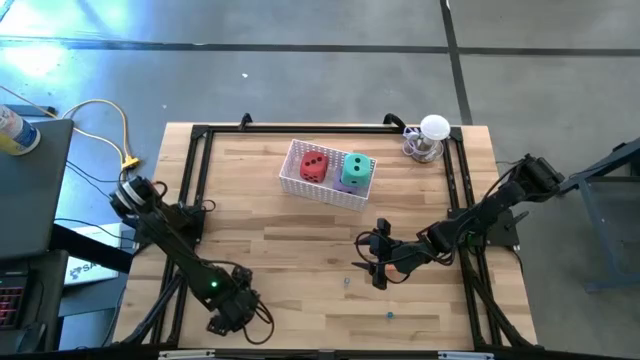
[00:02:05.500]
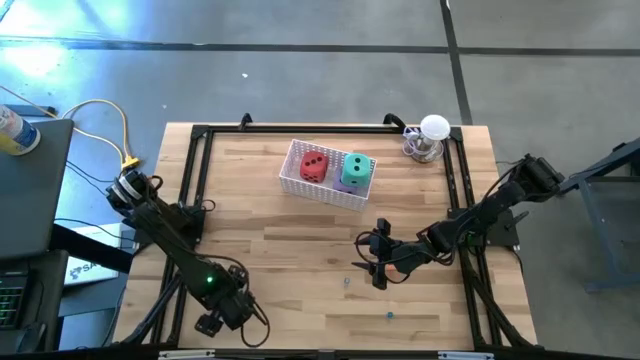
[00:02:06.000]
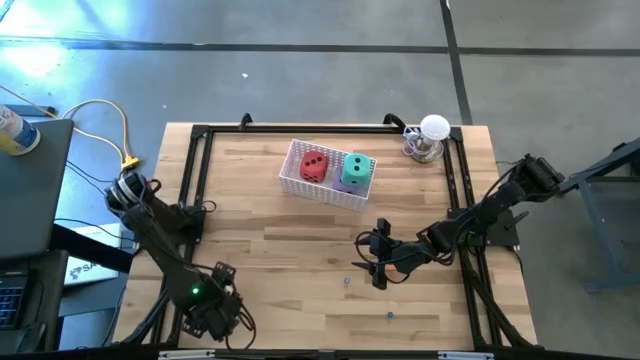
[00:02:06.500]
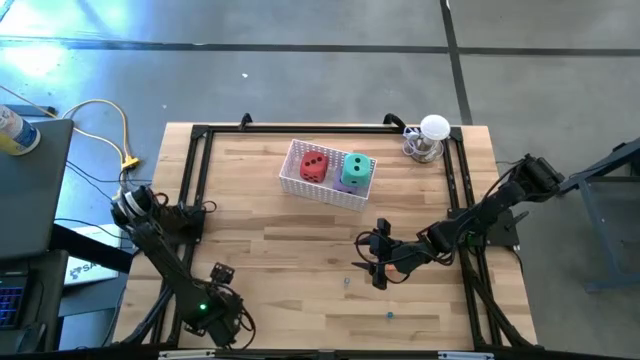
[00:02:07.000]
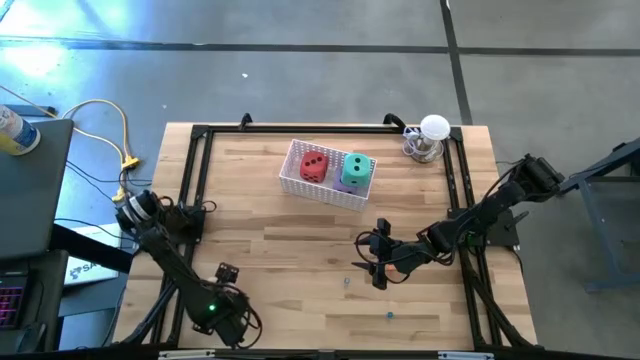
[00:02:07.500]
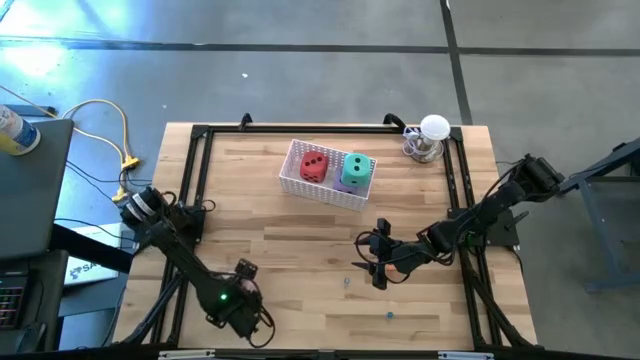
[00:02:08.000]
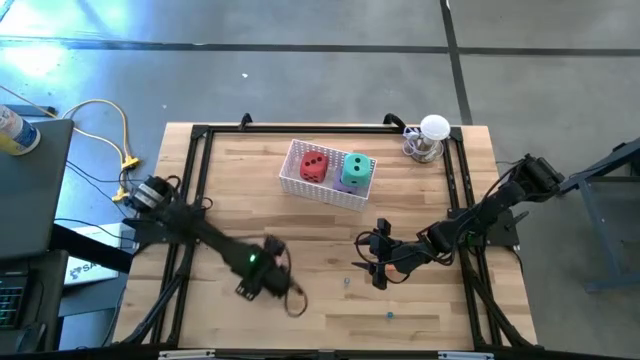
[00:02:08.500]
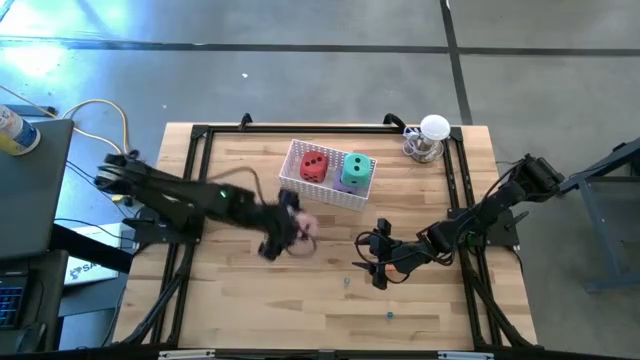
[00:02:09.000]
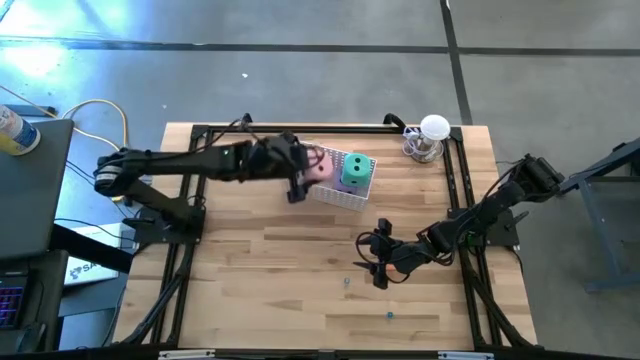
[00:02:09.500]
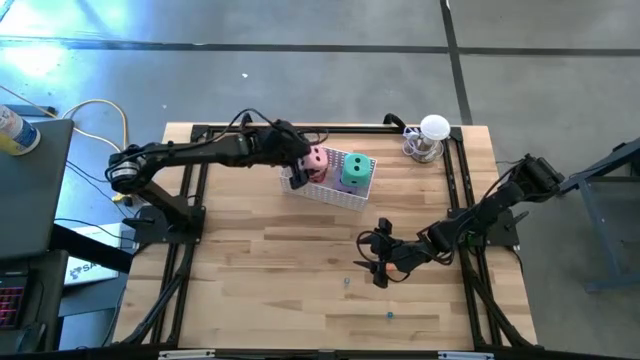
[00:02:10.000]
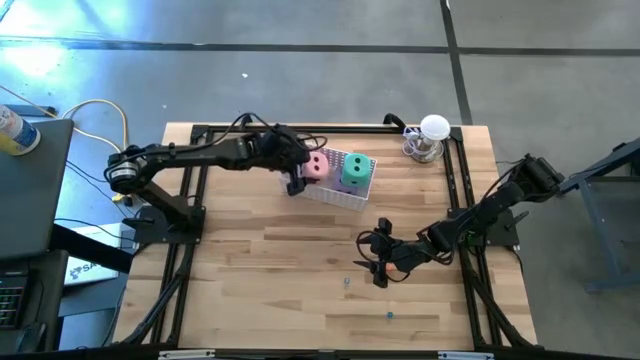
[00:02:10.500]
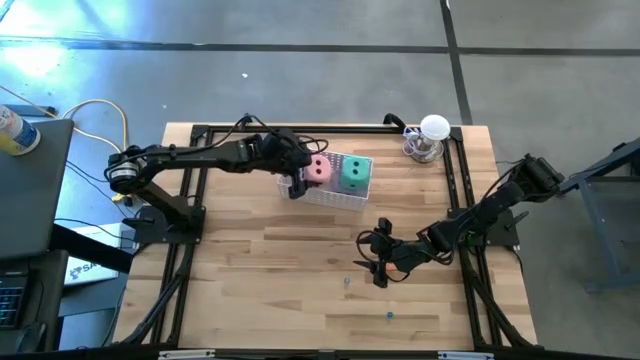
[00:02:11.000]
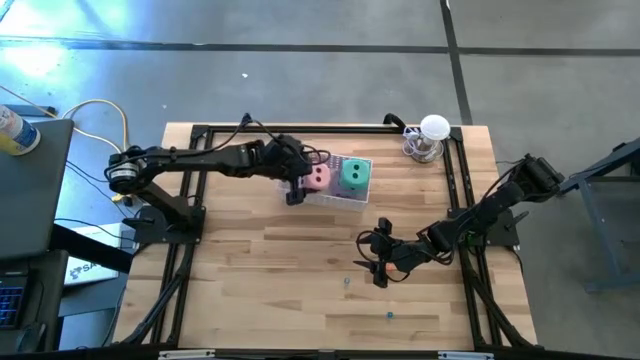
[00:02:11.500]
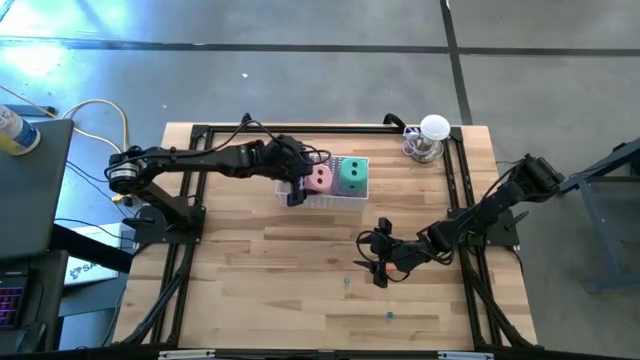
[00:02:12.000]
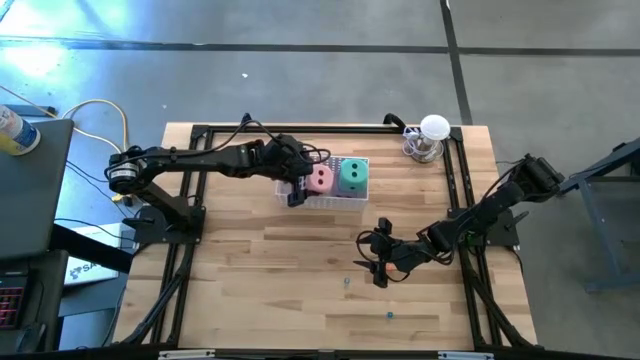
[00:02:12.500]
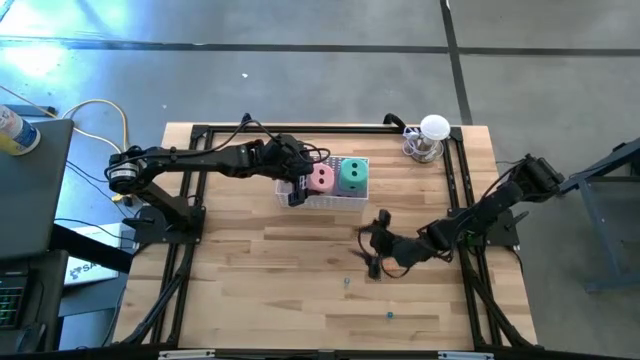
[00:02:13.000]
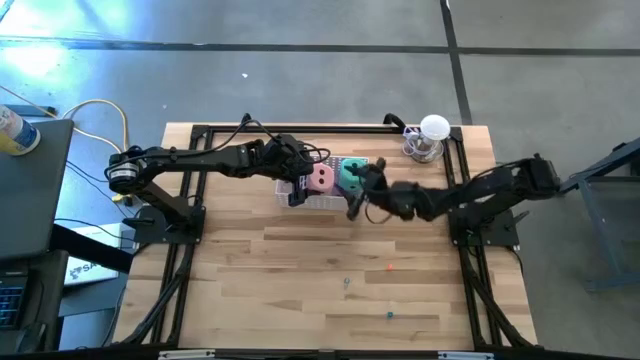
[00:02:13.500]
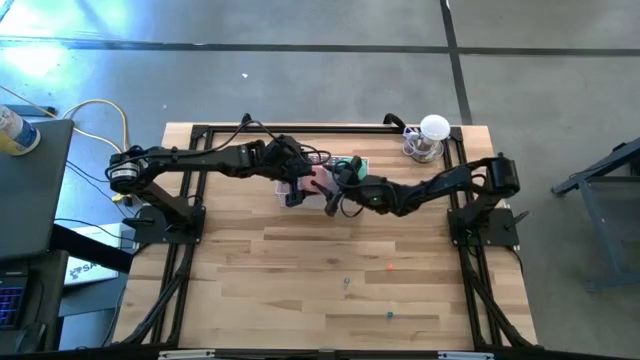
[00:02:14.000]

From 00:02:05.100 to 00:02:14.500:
Task: Pick & Place Dice
Put the big pink die into the white bin

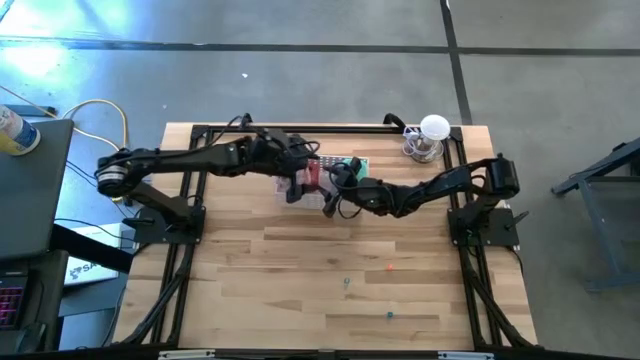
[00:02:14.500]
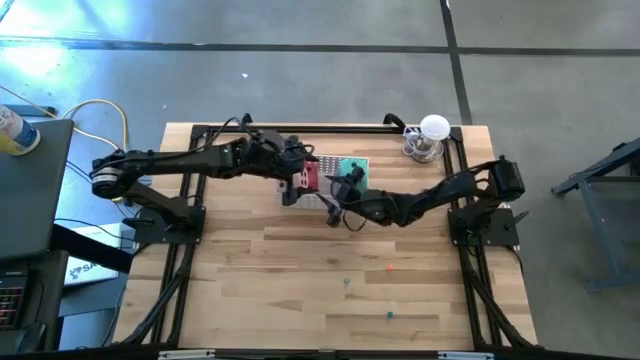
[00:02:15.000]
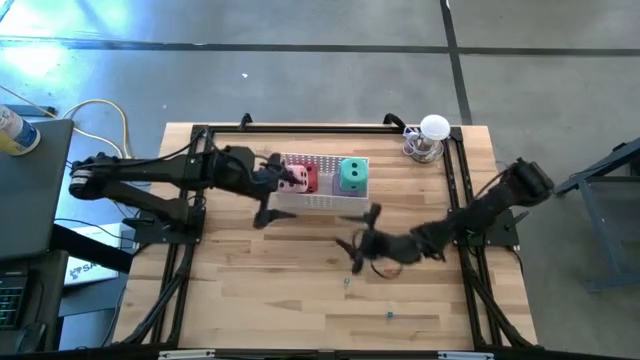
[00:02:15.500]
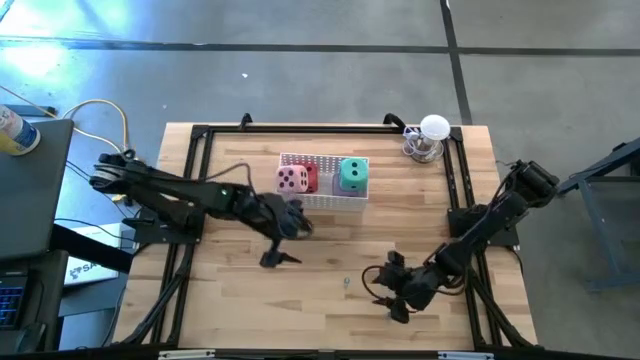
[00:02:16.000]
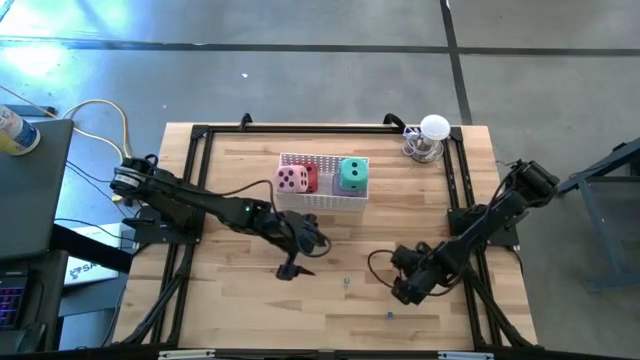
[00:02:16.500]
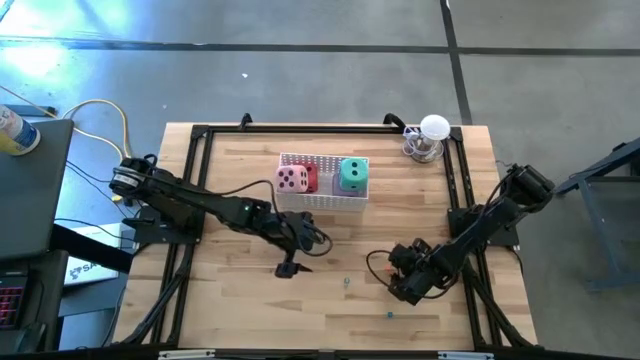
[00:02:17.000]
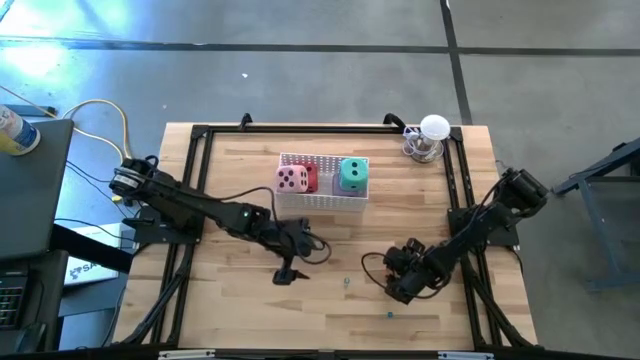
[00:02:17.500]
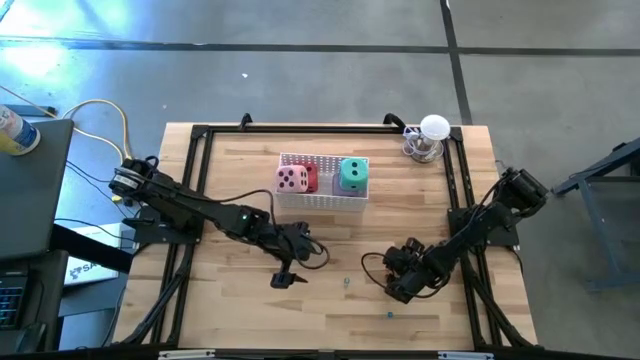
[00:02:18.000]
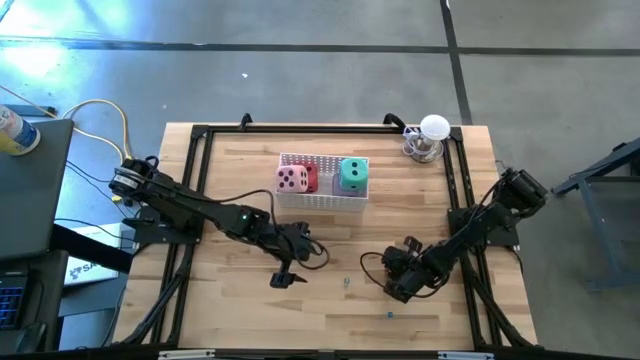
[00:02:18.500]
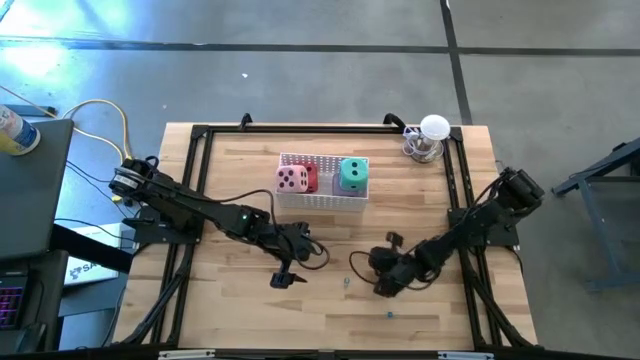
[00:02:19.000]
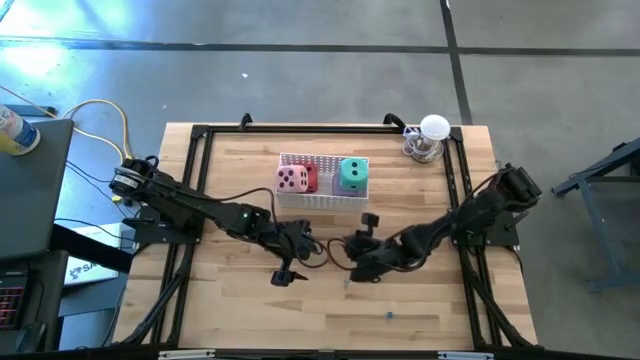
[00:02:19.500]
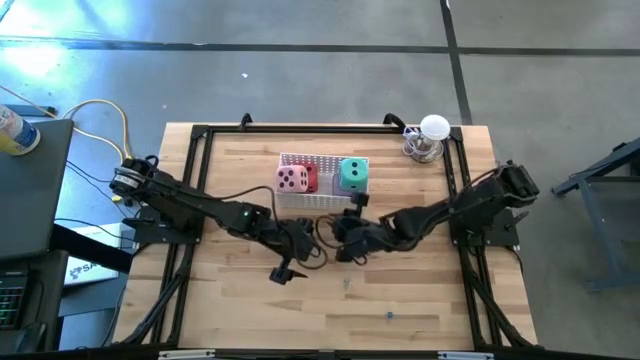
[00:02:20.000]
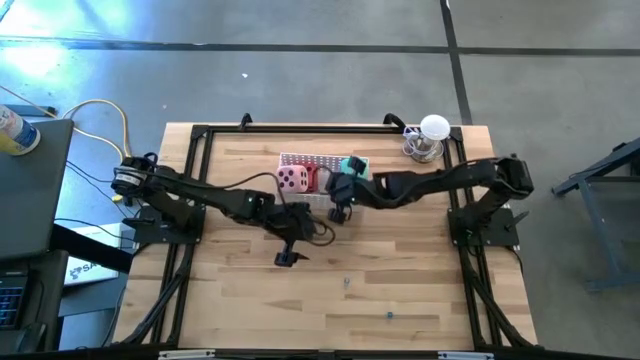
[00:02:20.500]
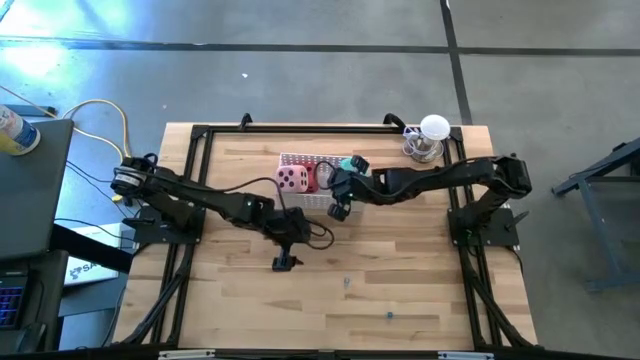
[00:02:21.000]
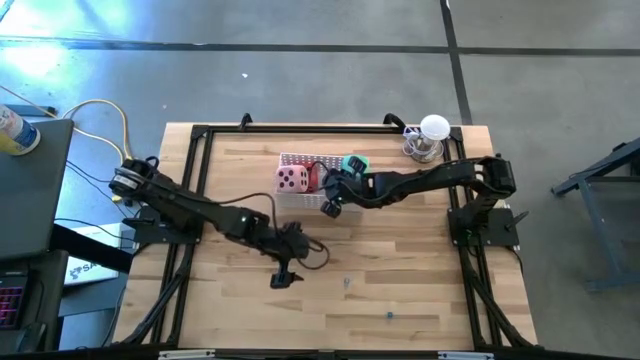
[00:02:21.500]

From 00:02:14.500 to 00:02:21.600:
Put the small orange die into the white bin

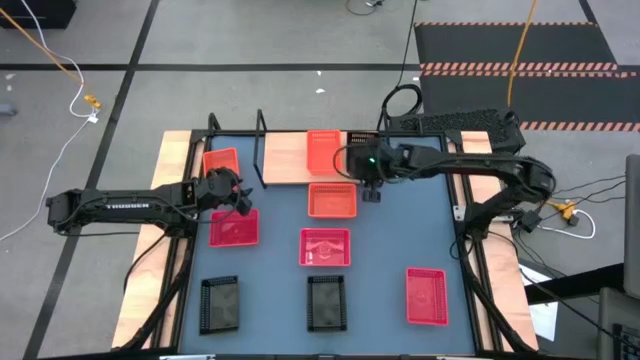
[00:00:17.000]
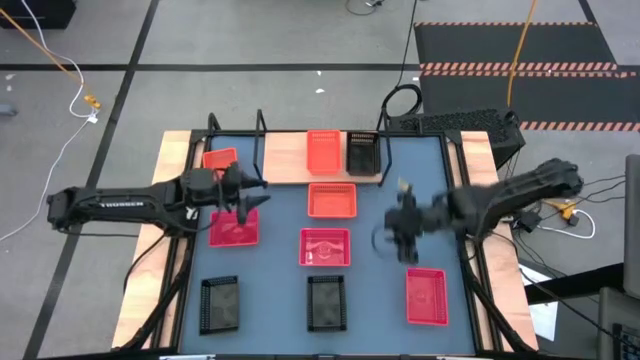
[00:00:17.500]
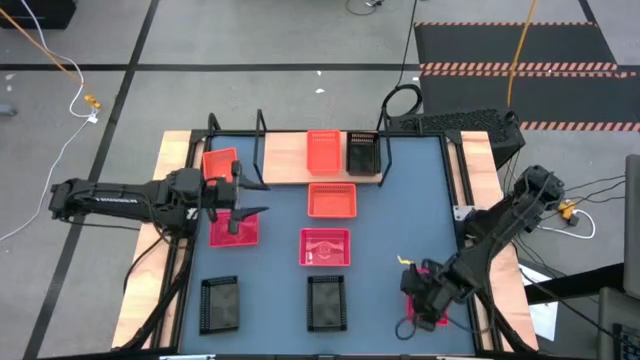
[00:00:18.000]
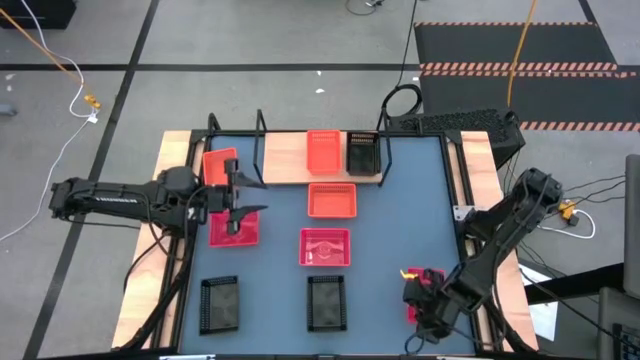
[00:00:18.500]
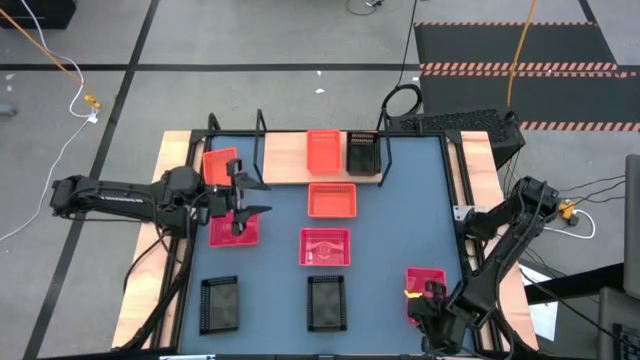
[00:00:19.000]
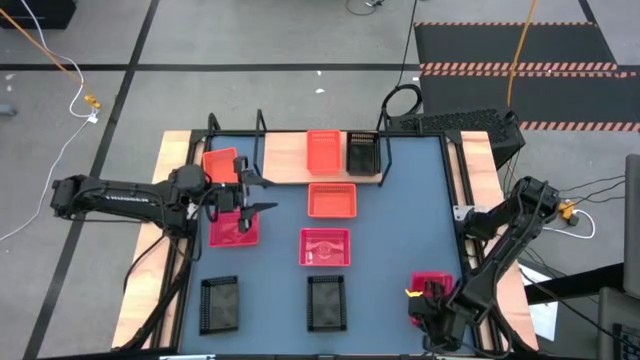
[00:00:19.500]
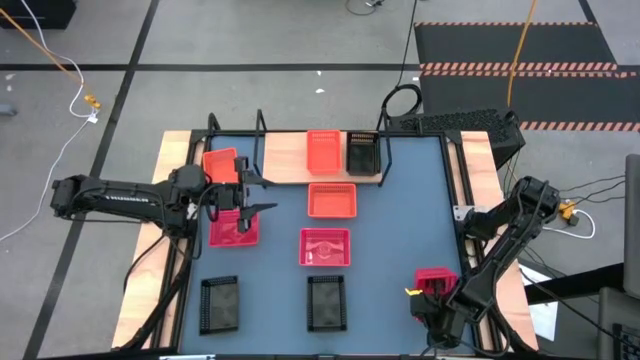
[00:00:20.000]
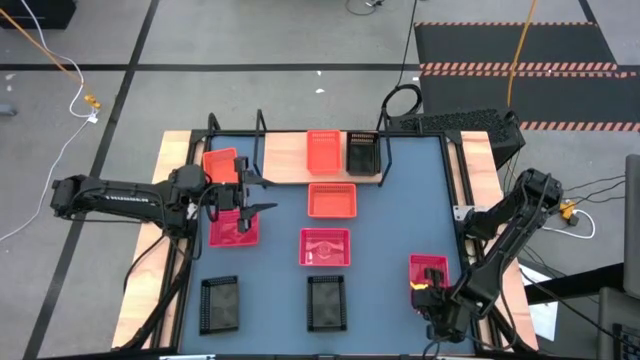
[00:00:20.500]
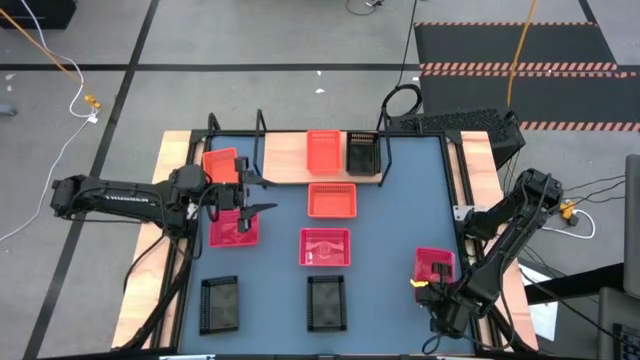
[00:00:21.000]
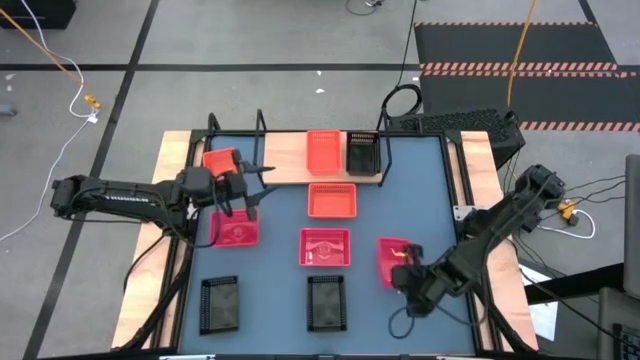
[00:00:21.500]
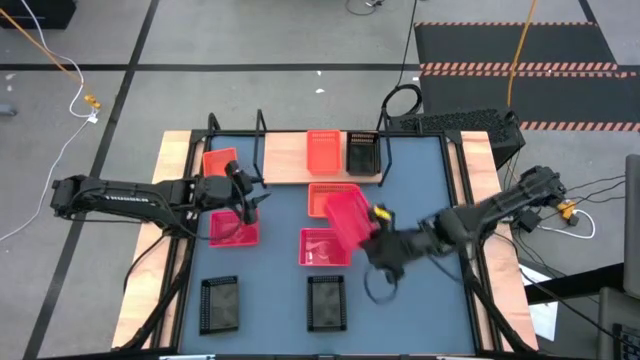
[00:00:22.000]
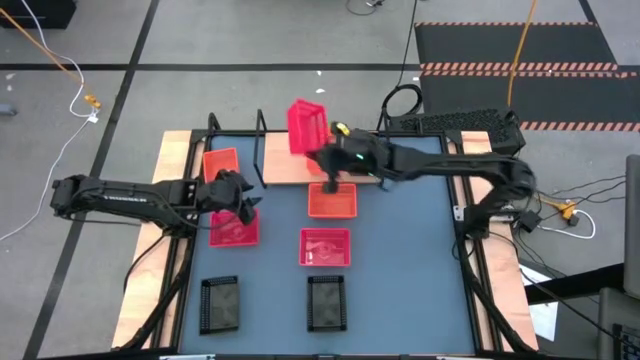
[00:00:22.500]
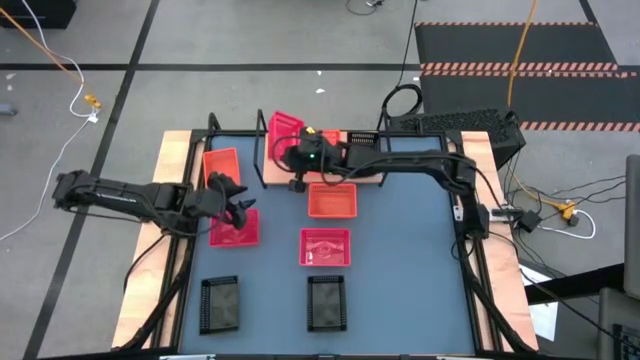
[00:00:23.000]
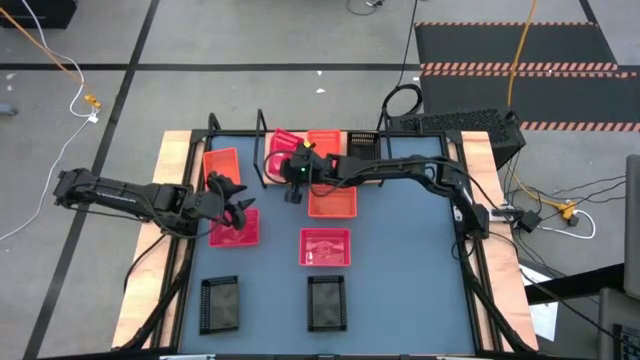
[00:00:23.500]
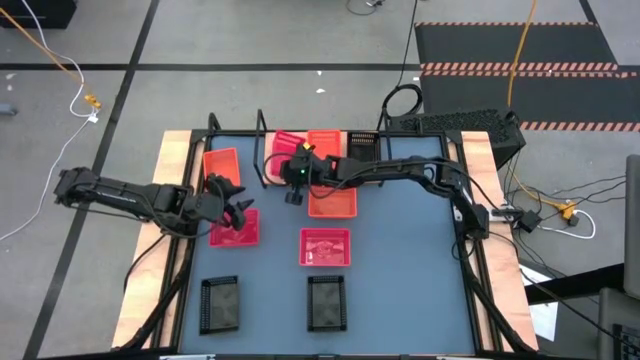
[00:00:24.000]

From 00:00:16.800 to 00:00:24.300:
Task: Stack baskets on shelf by color
Put the right red basket on the shelf
